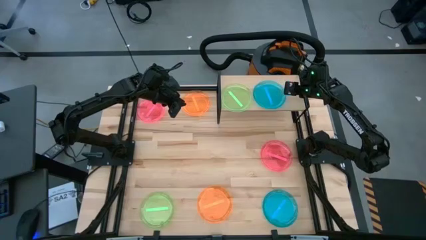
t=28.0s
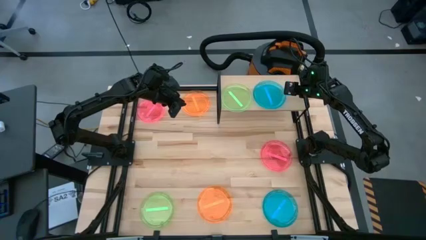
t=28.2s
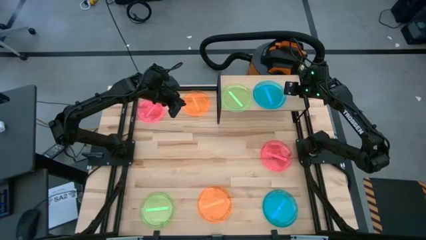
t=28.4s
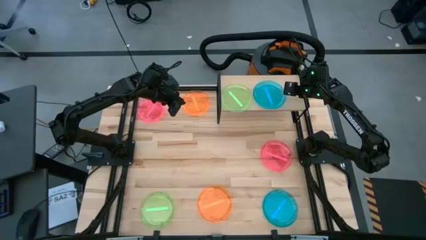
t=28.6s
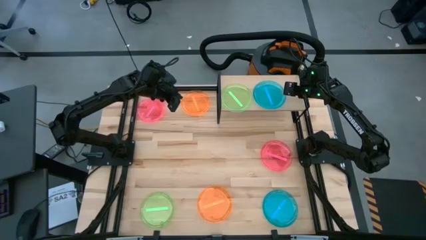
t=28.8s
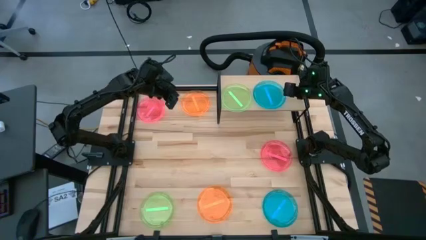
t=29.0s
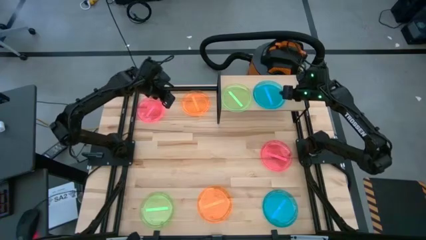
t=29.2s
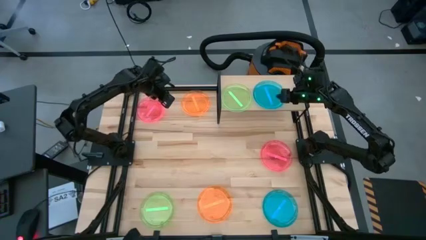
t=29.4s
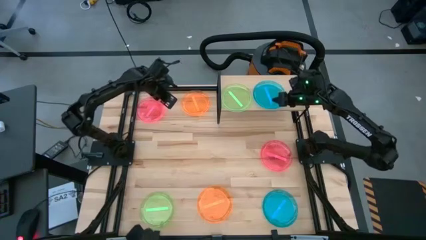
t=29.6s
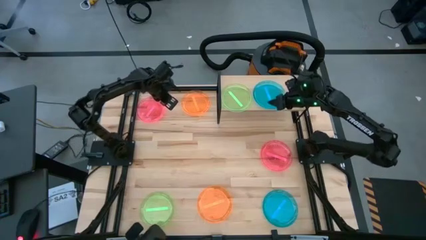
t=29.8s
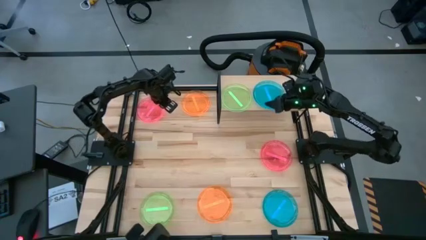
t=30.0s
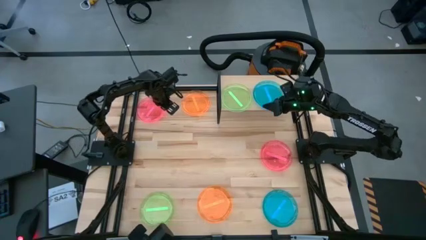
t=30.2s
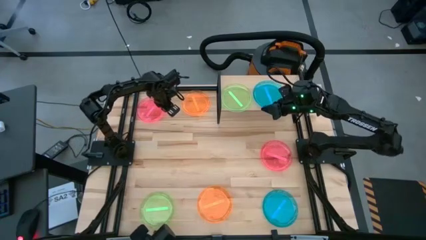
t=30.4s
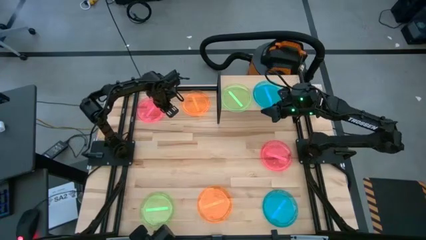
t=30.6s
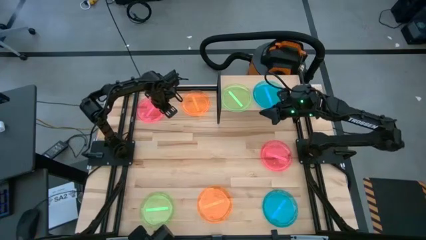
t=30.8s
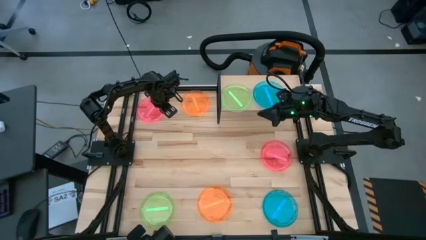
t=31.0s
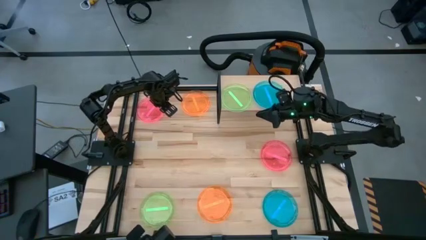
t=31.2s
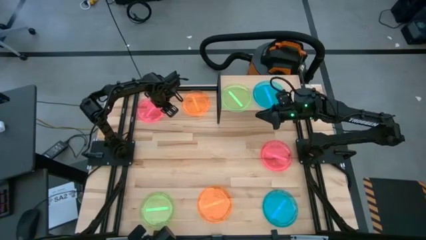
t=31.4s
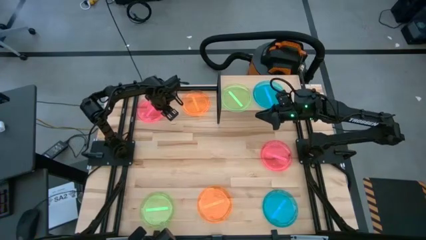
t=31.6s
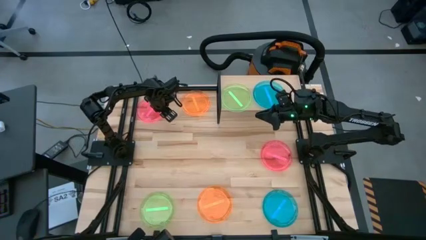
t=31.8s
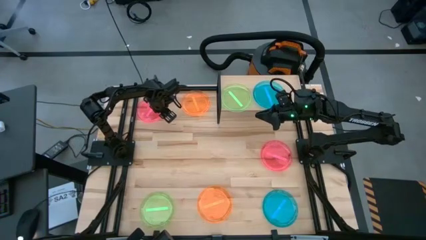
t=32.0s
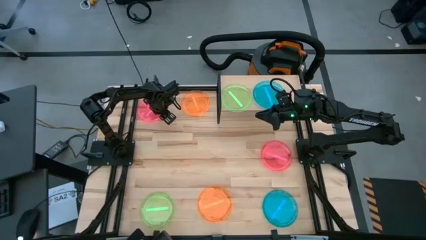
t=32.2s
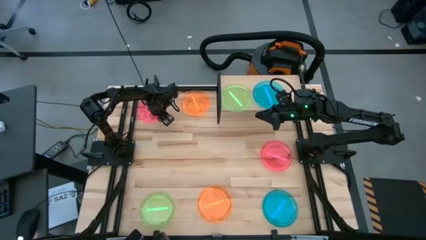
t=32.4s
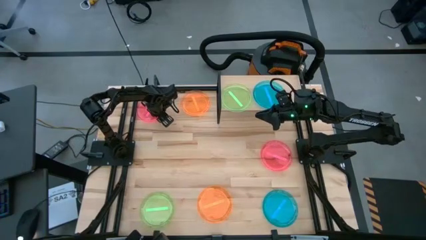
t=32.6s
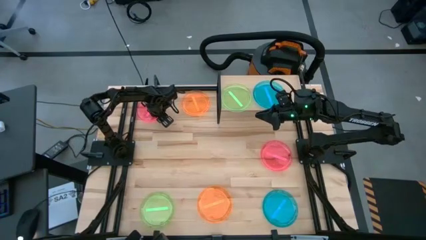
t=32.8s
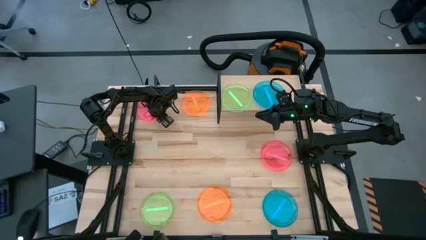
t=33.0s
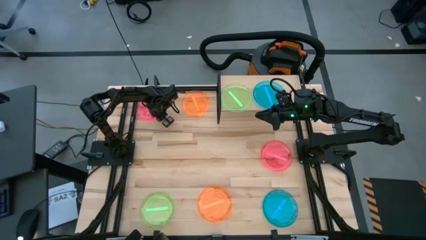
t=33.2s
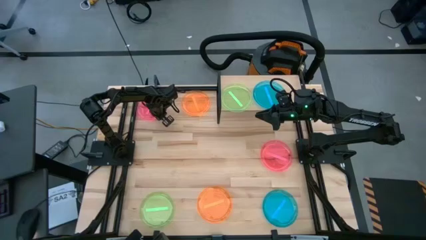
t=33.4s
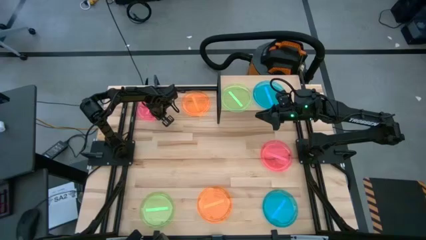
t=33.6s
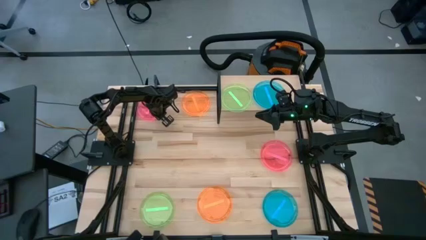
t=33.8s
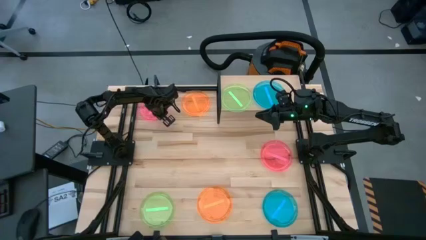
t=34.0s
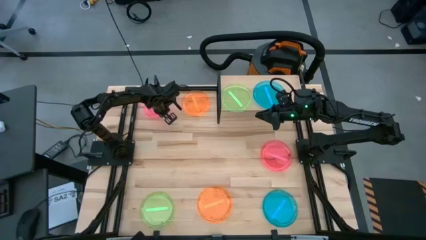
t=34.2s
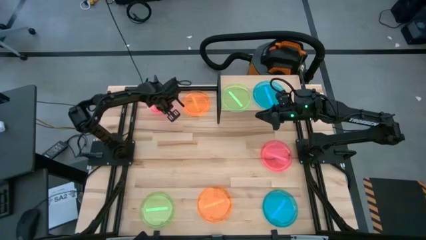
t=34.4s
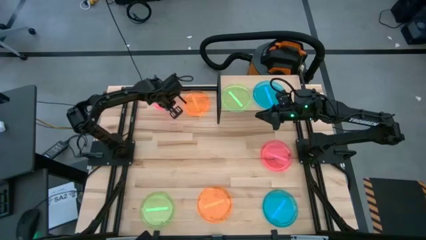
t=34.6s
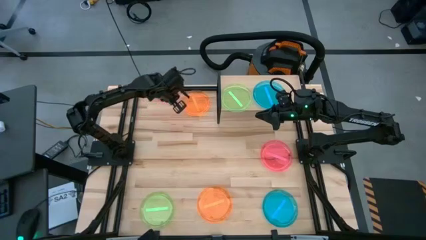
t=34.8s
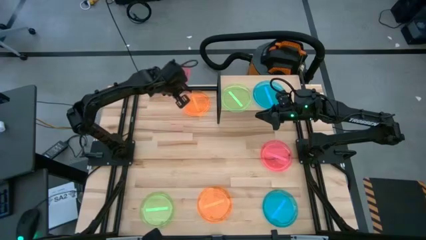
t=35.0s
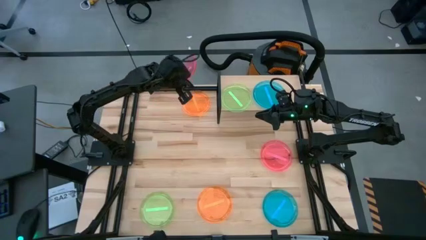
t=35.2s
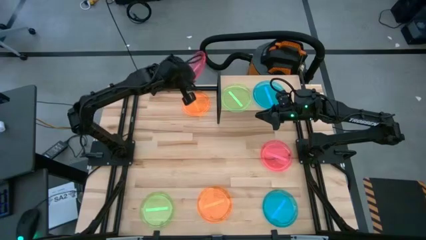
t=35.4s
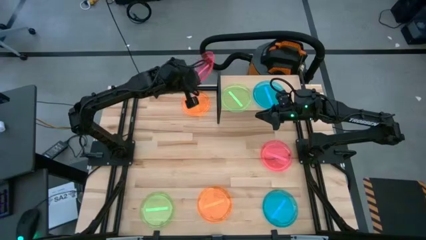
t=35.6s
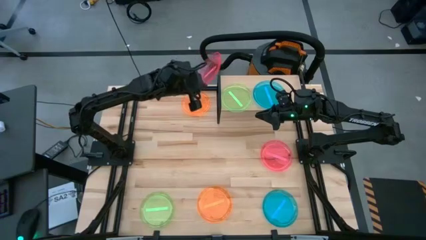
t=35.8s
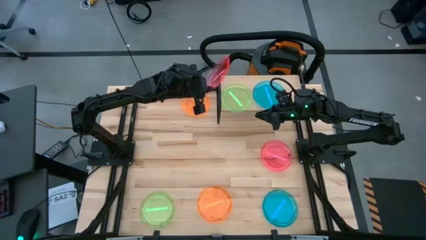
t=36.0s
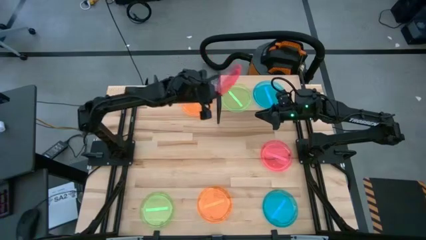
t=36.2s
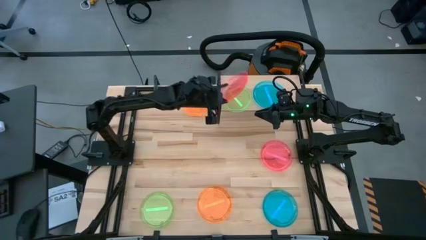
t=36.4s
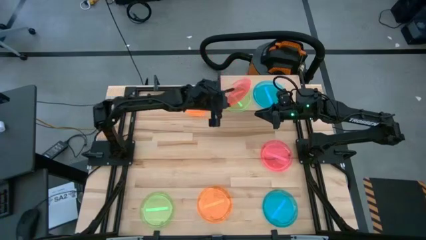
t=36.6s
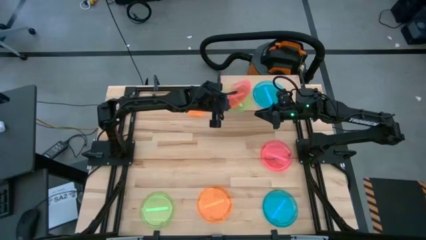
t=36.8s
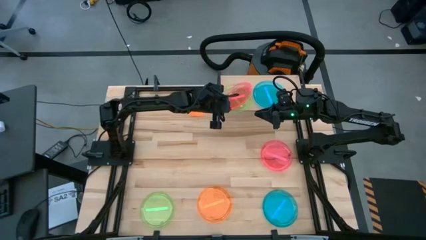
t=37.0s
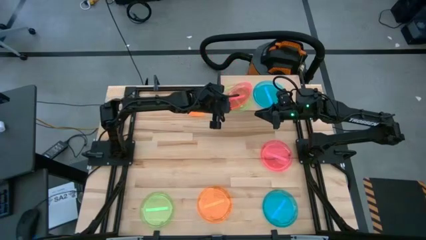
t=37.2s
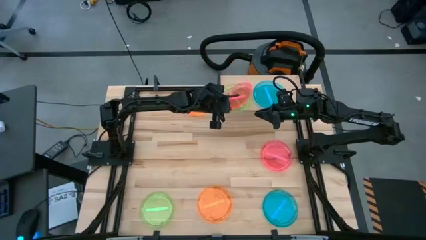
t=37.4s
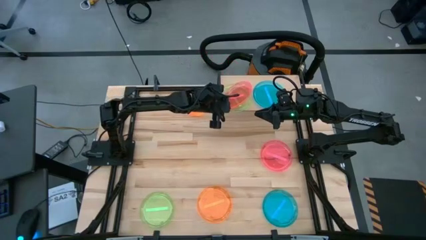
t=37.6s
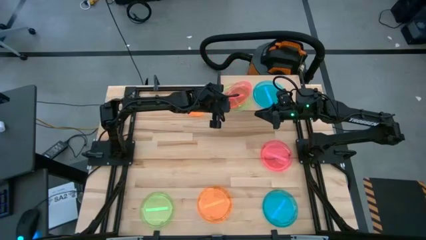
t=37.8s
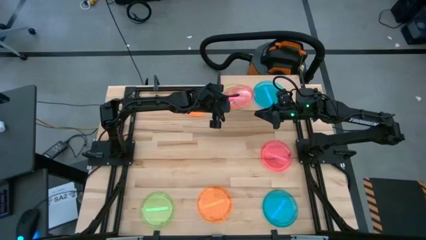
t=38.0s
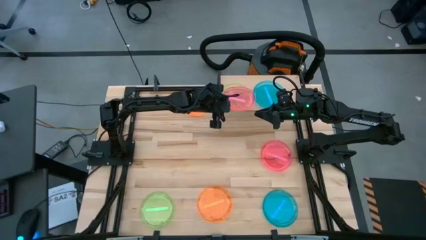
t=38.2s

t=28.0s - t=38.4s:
Task: Place and stack plates onto a shelf
Stack the top pink plate on top of the green plate on the shelf
